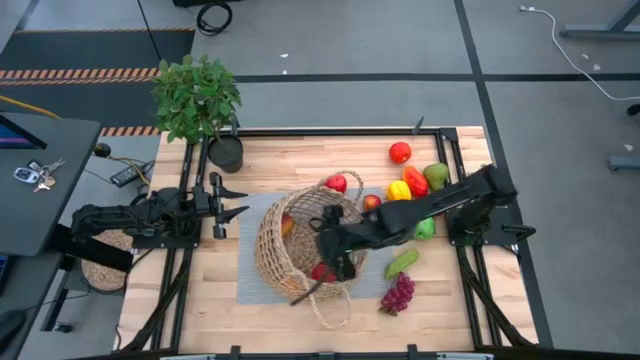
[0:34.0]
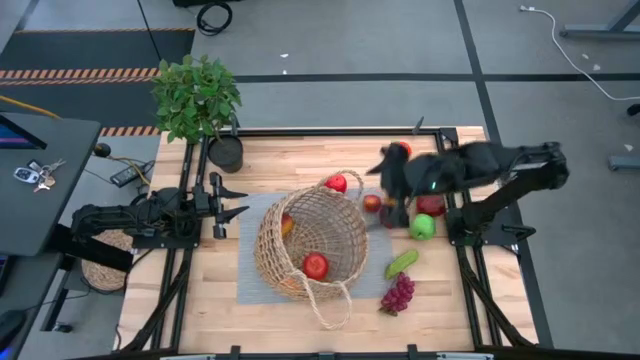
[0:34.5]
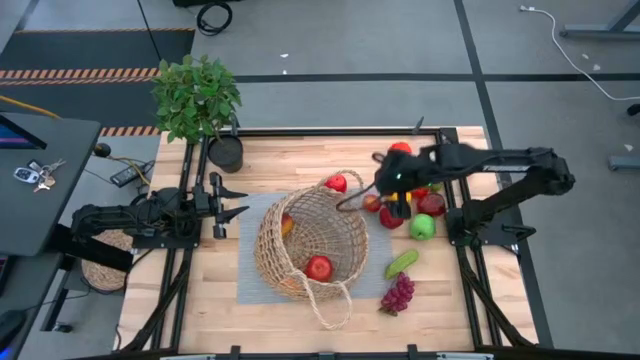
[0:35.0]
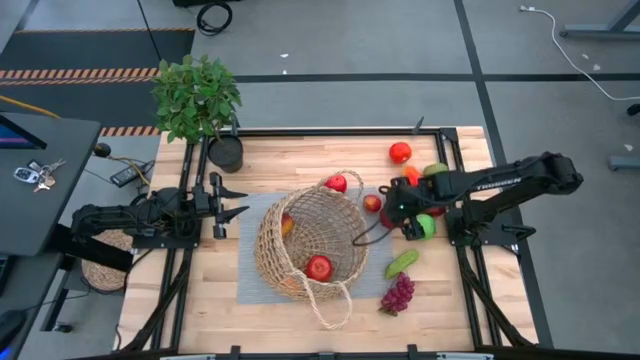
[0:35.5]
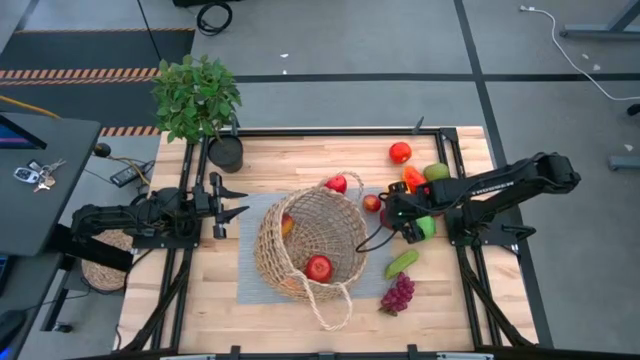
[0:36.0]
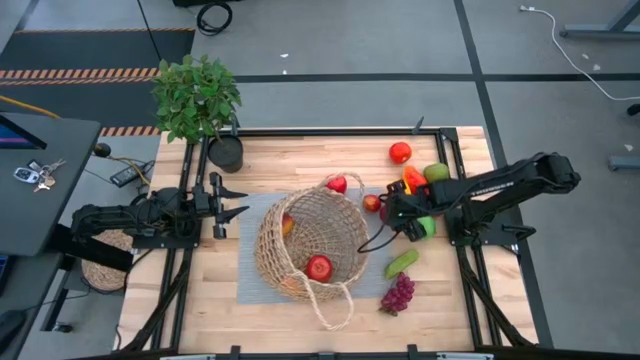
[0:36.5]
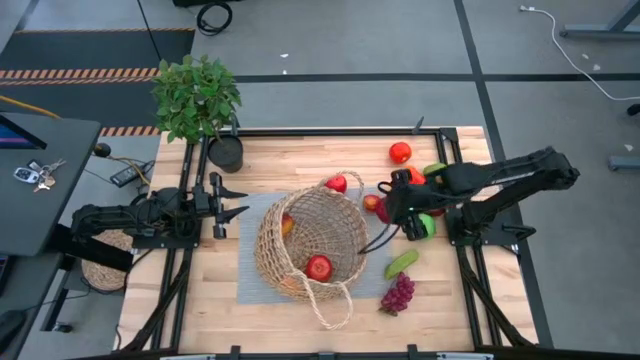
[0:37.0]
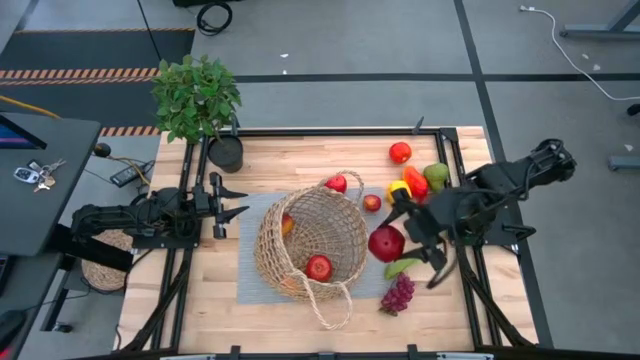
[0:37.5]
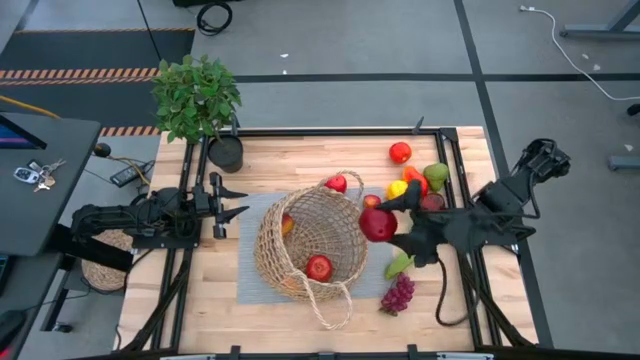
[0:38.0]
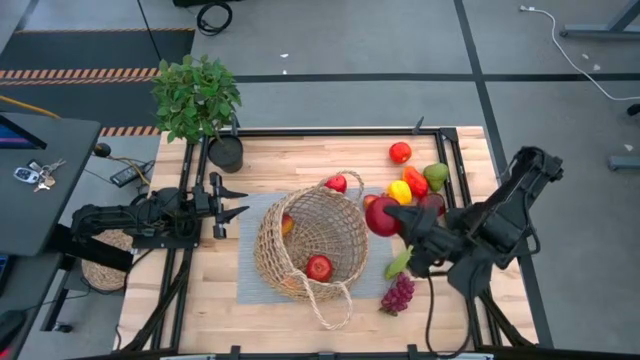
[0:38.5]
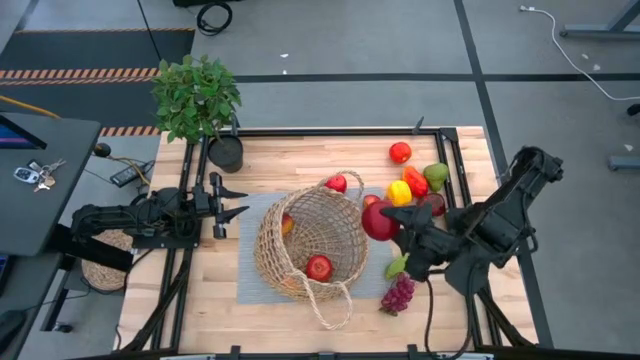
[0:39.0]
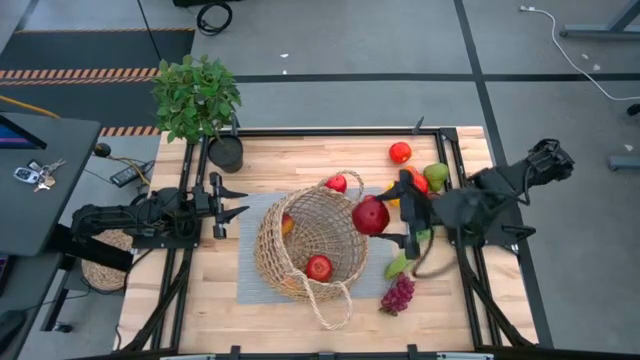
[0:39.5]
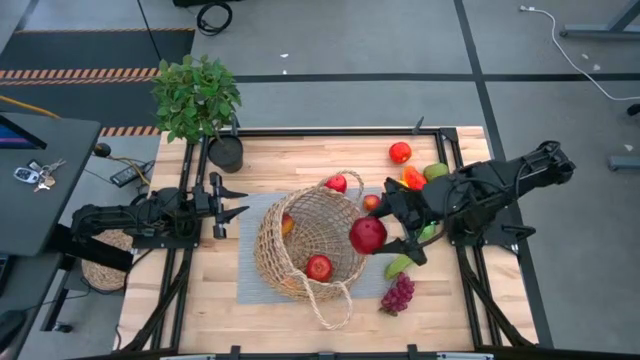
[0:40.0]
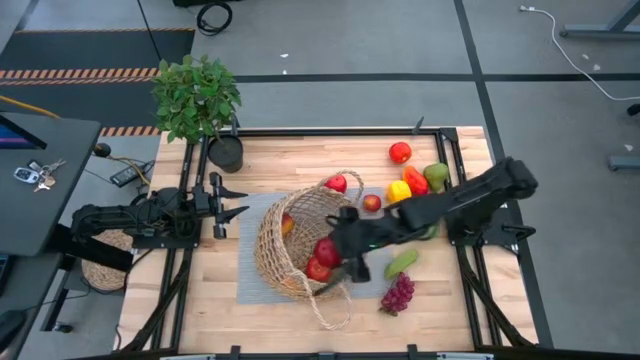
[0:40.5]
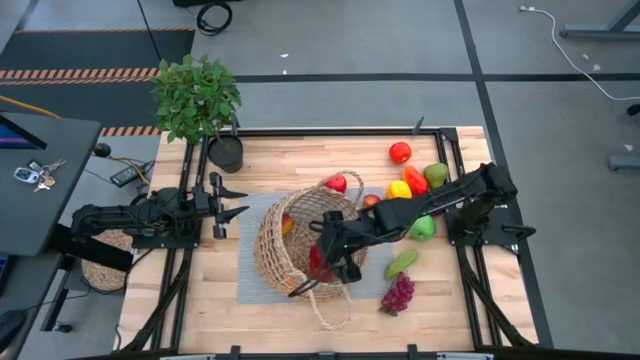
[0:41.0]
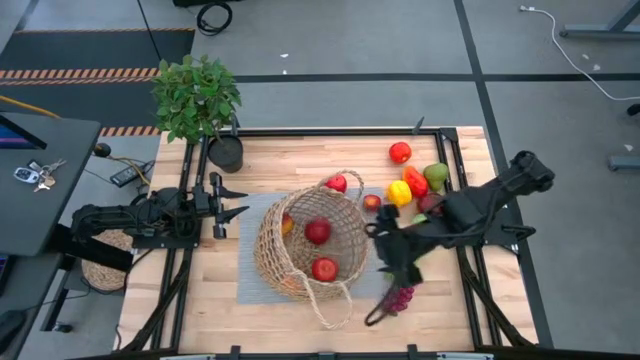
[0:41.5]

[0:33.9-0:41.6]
Task: Build produce basket
Put the pomegranate into the brown basket

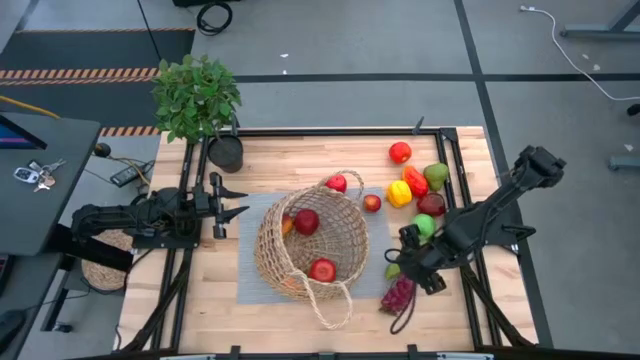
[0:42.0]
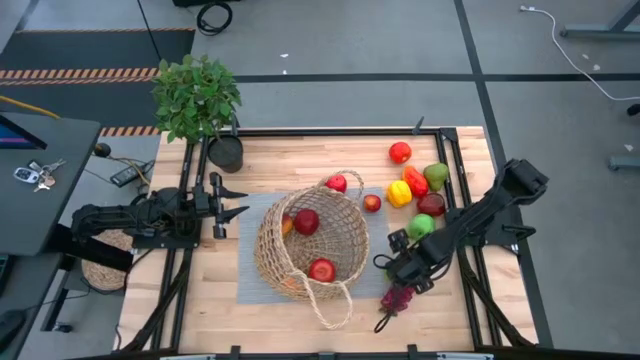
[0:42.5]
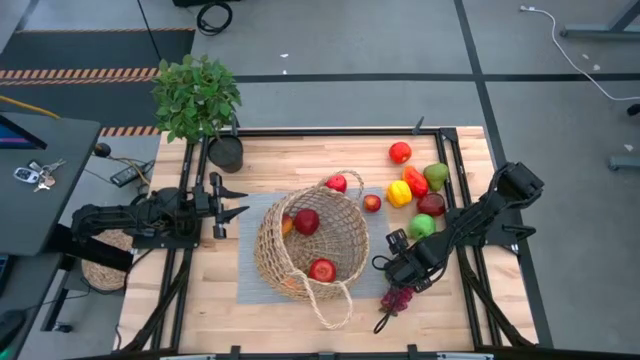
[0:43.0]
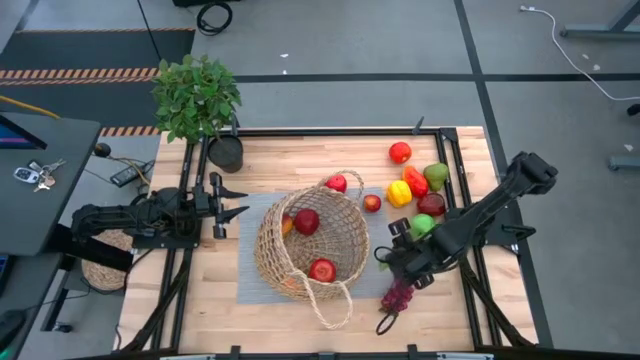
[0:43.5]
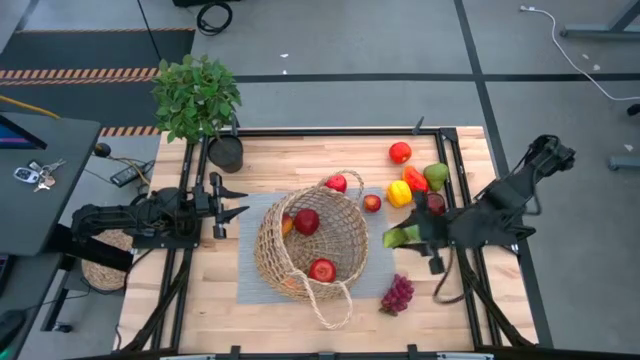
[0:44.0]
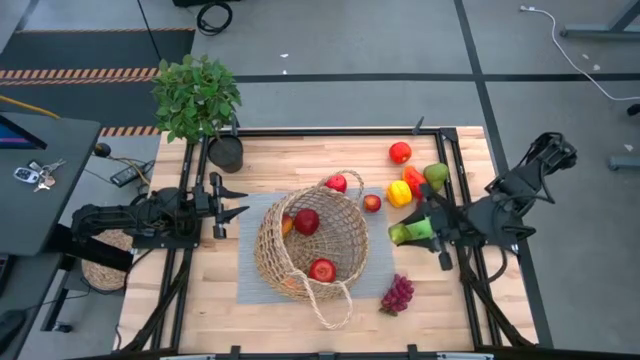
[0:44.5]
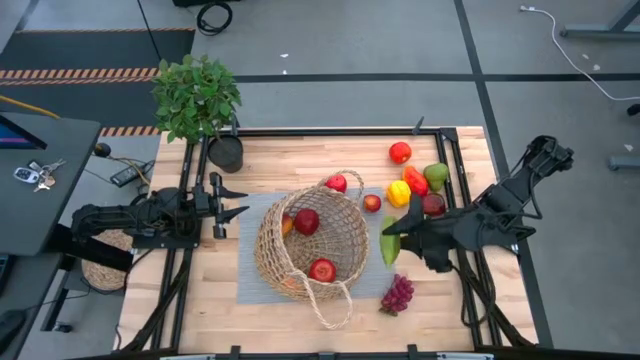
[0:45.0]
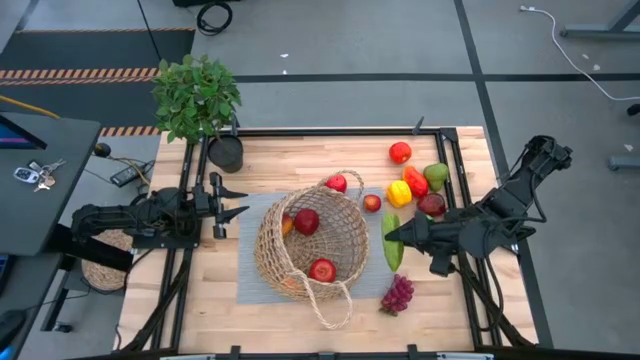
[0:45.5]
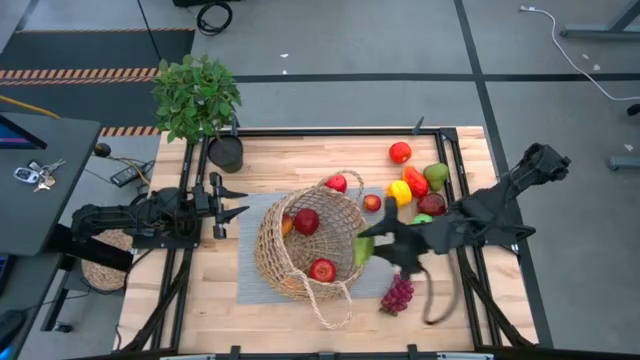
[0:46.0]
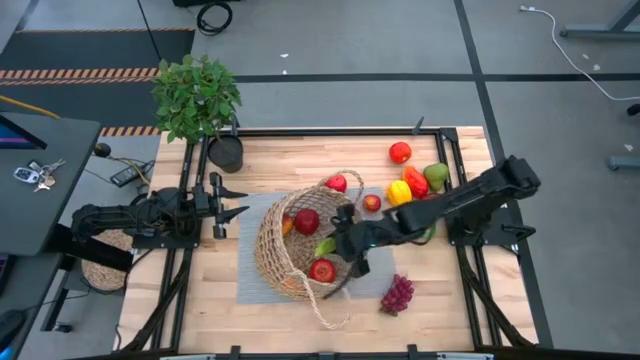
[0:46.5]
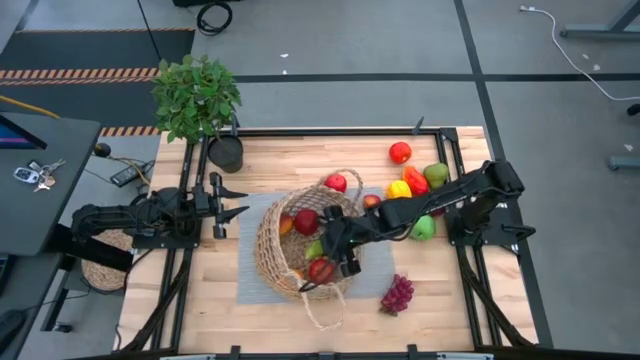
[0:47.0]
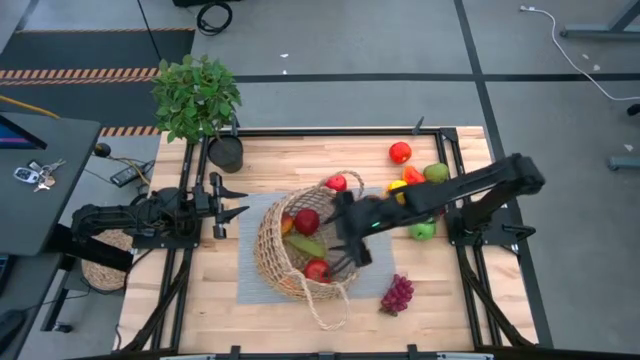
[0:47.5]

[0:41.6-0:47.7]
Put the cucumber into the brown basket

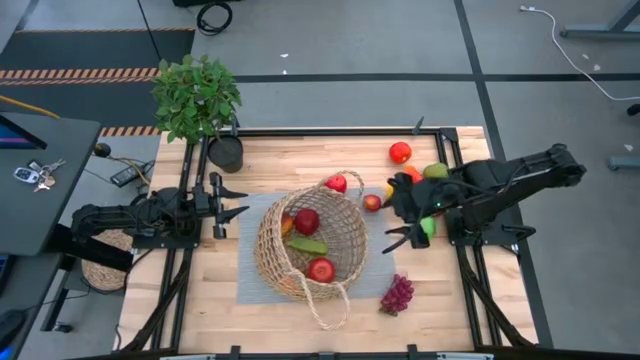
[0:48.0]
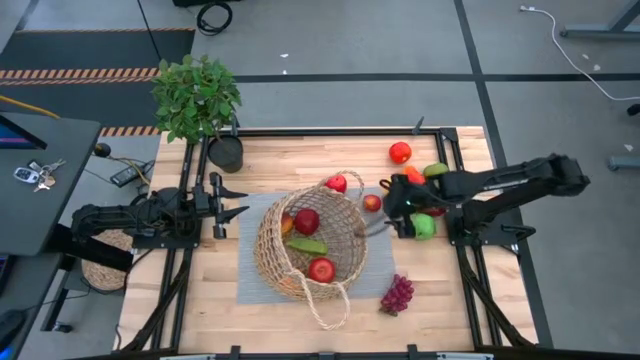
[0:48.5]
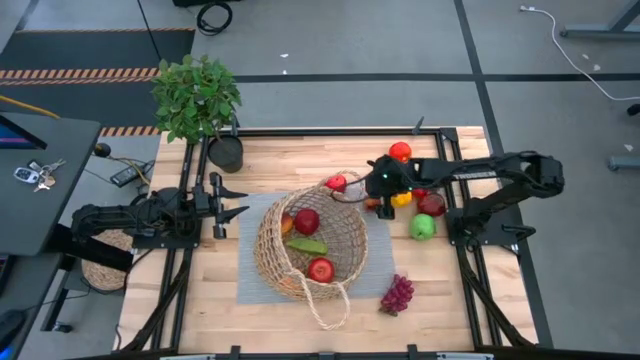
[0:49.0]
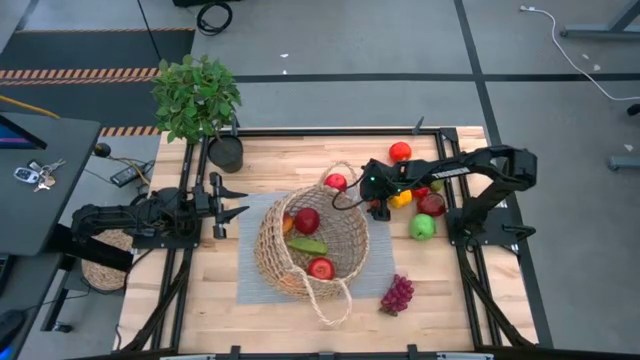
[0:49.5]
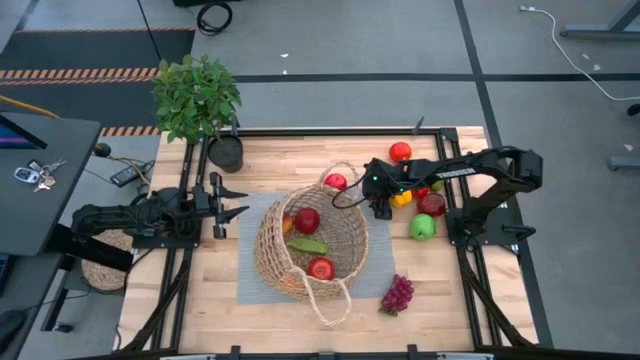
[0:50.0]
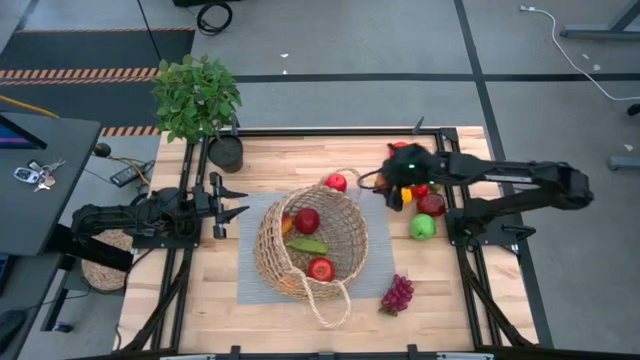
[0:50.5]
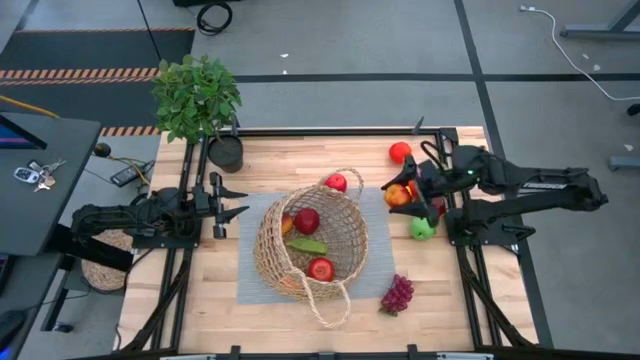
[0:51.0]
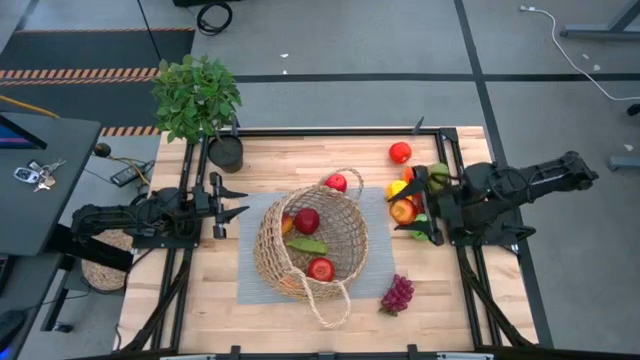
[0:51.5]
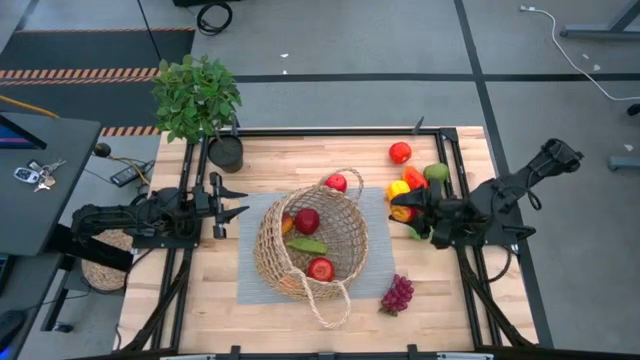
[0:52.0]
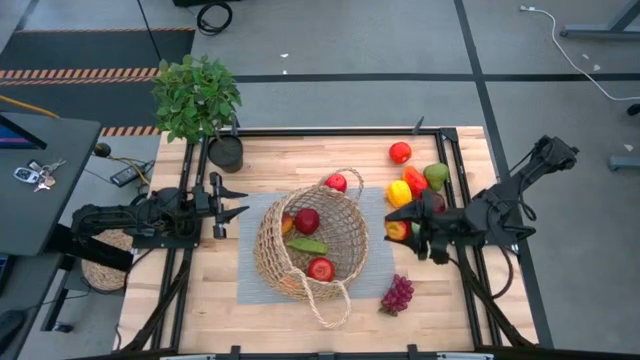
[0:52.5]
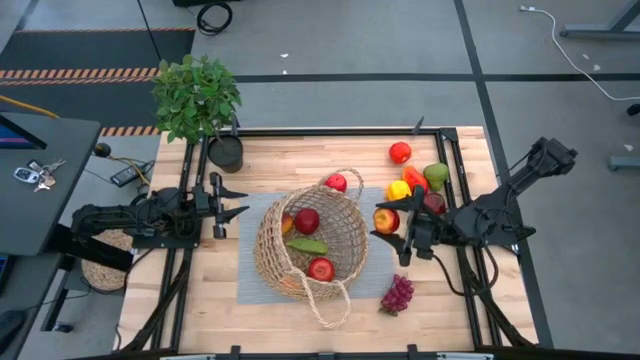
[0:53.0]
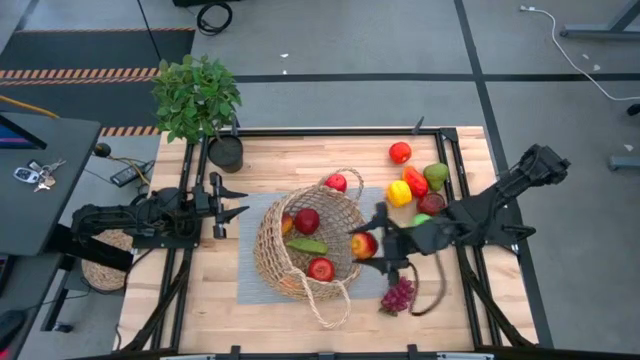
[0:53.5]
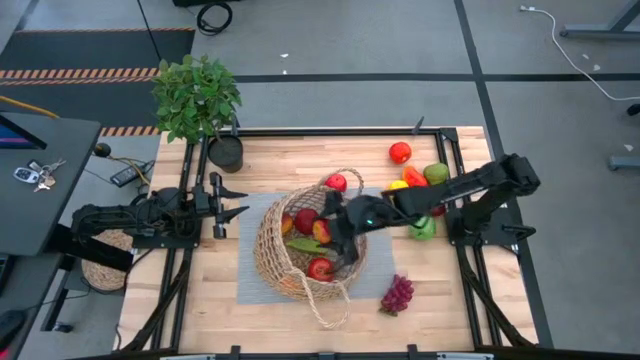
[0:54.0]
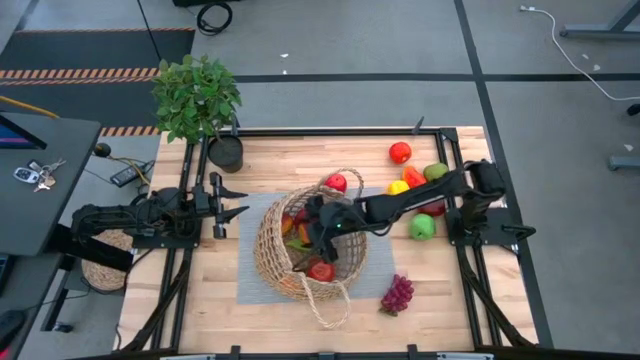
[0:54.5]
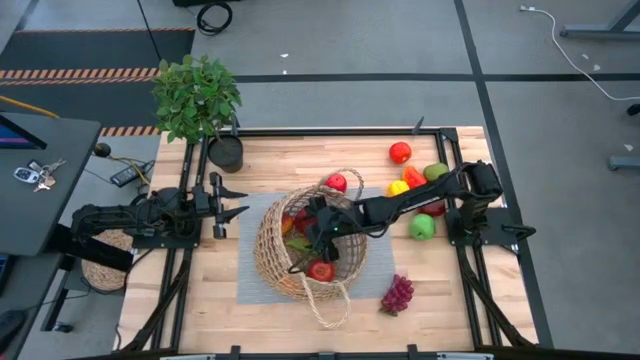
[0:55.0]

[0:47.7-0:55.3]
Put the red apple into the brown basket
